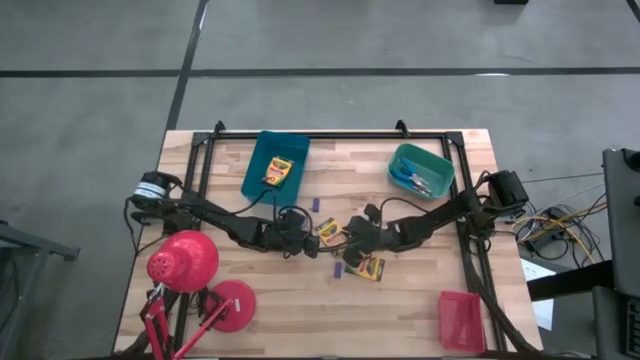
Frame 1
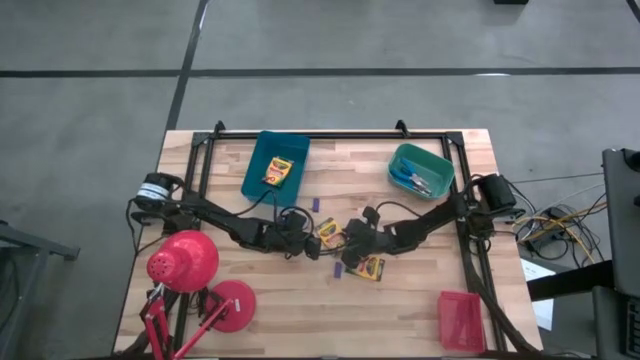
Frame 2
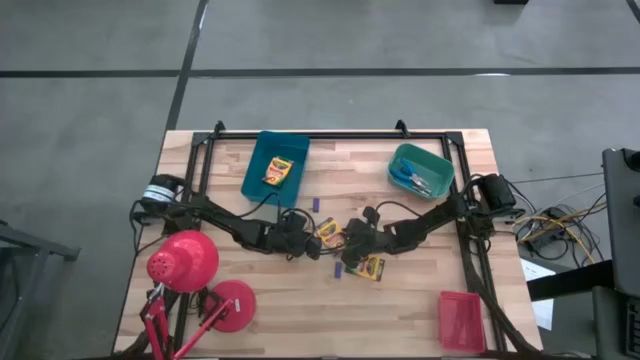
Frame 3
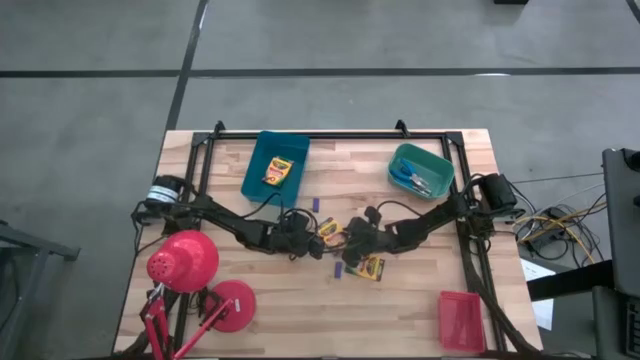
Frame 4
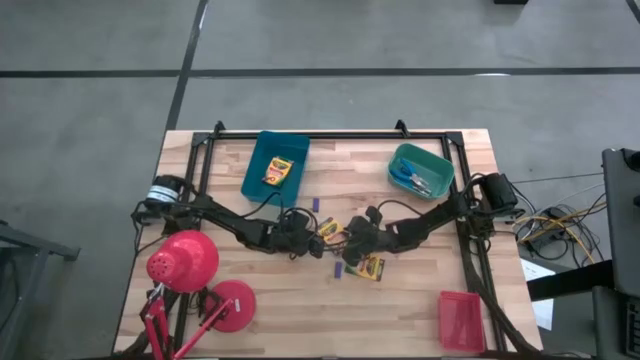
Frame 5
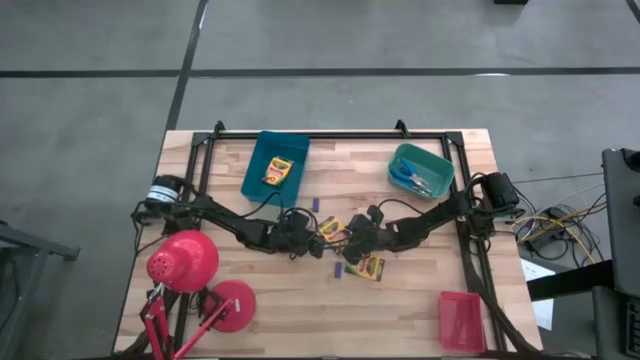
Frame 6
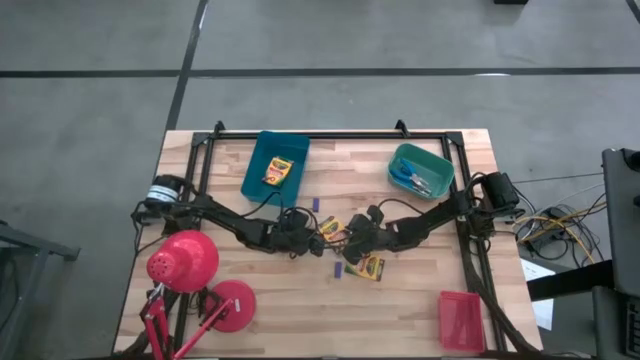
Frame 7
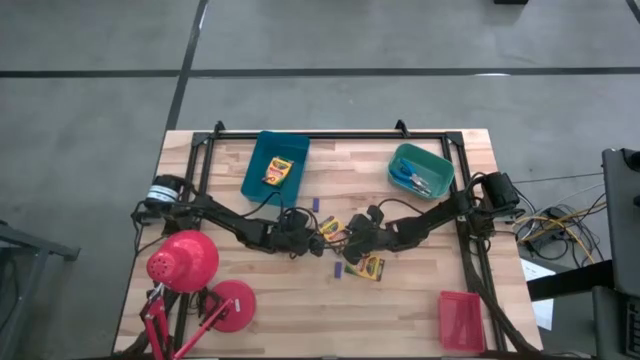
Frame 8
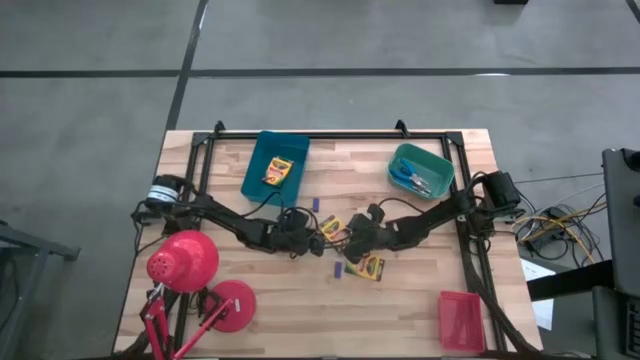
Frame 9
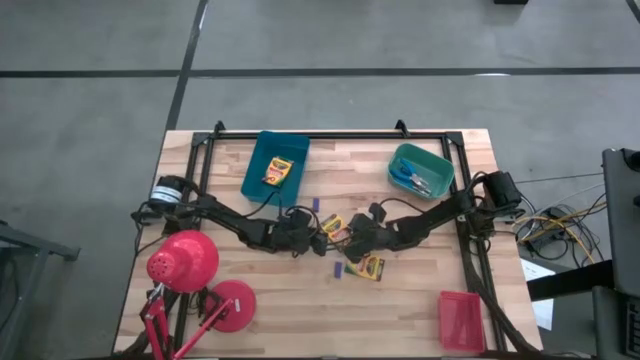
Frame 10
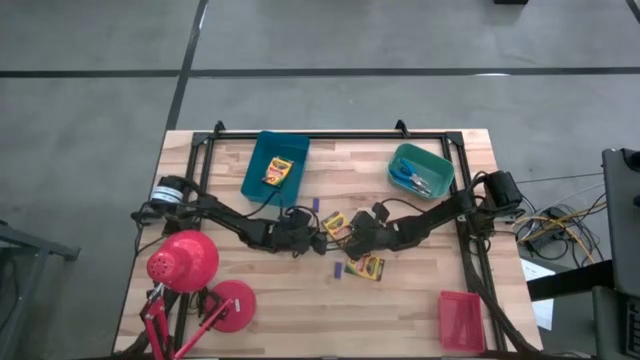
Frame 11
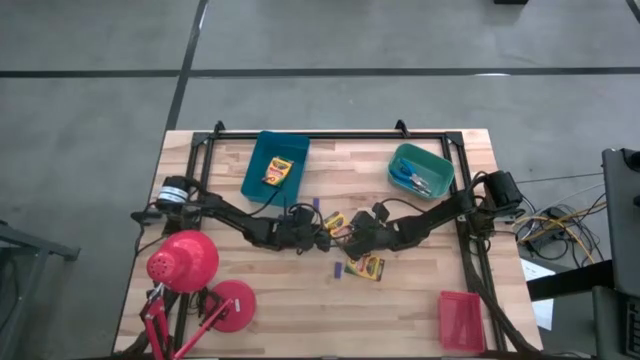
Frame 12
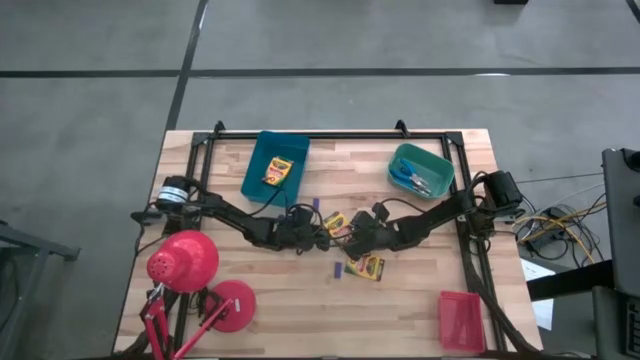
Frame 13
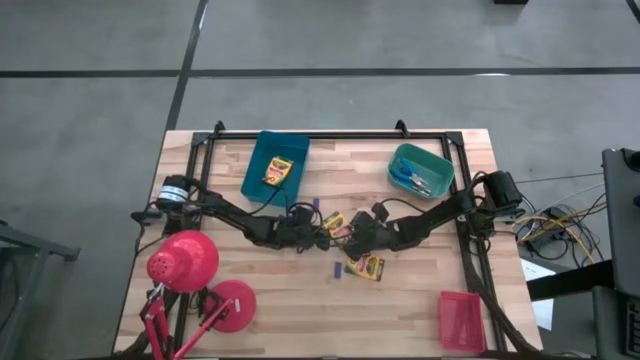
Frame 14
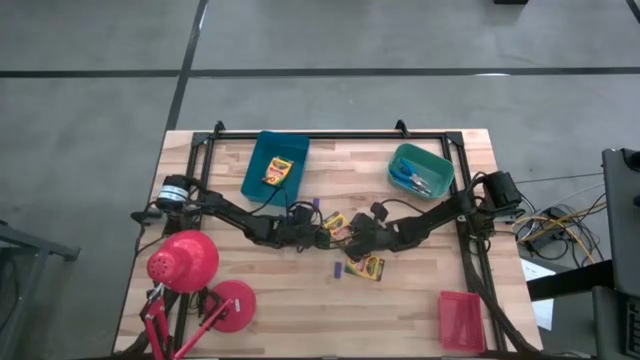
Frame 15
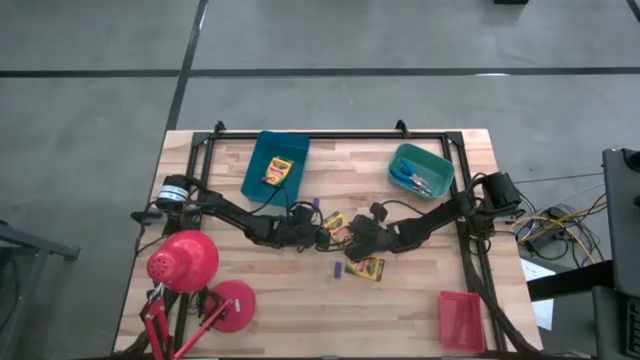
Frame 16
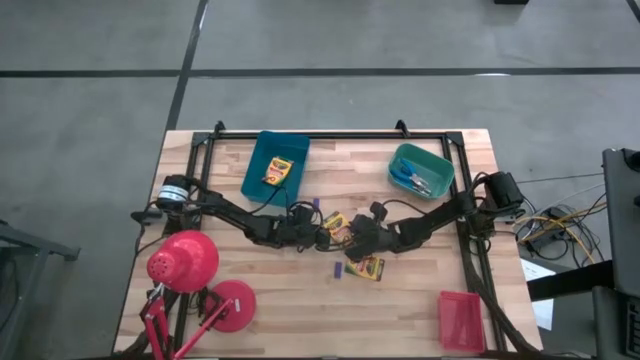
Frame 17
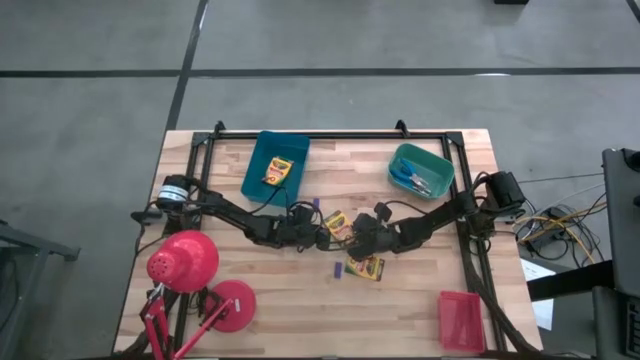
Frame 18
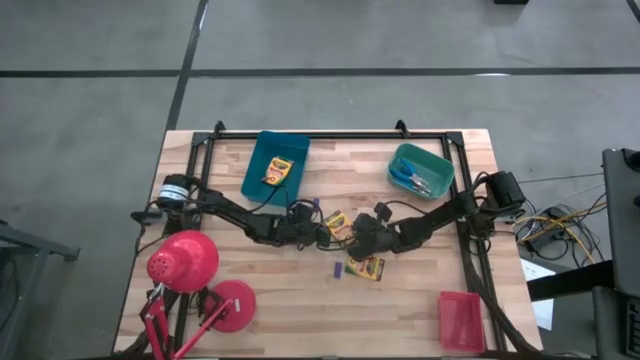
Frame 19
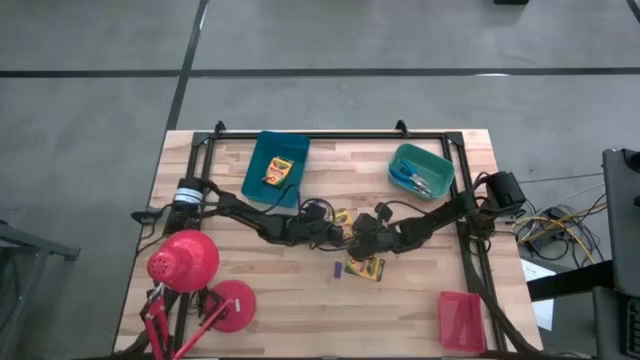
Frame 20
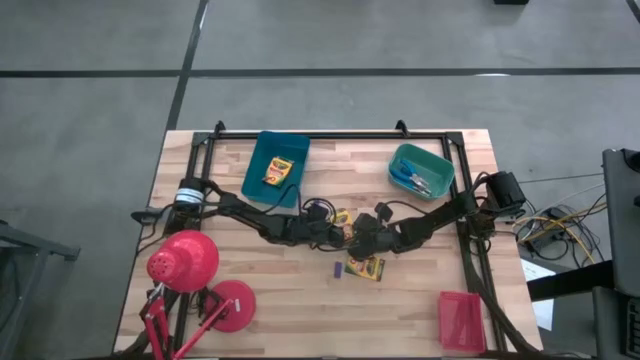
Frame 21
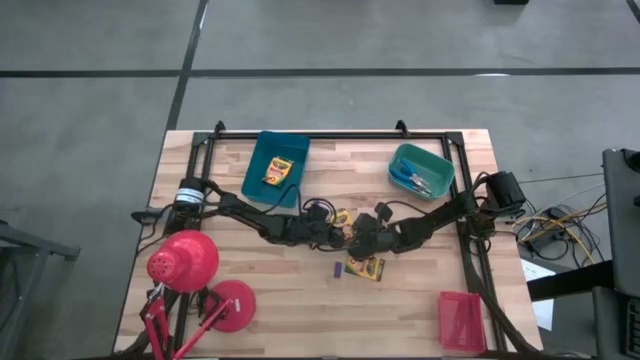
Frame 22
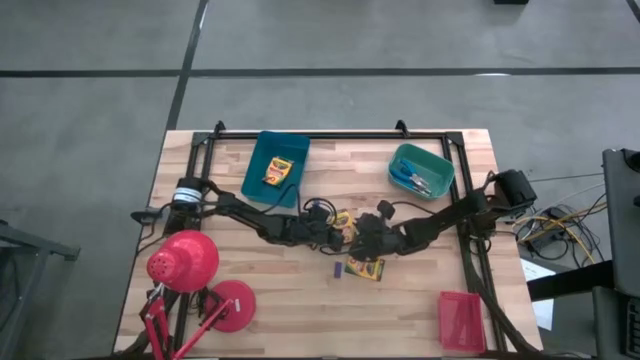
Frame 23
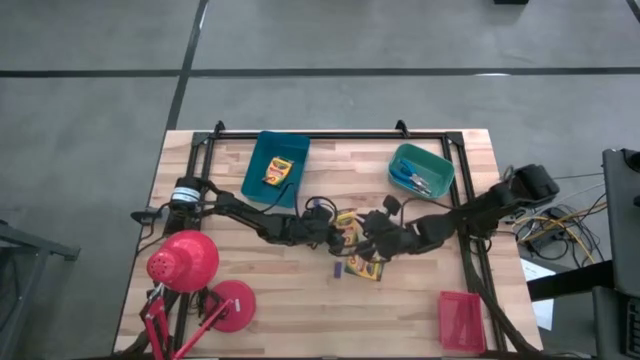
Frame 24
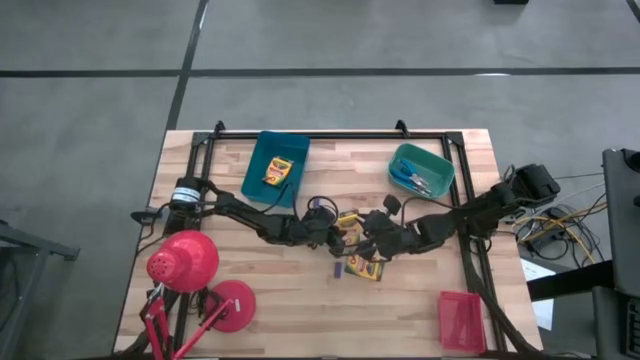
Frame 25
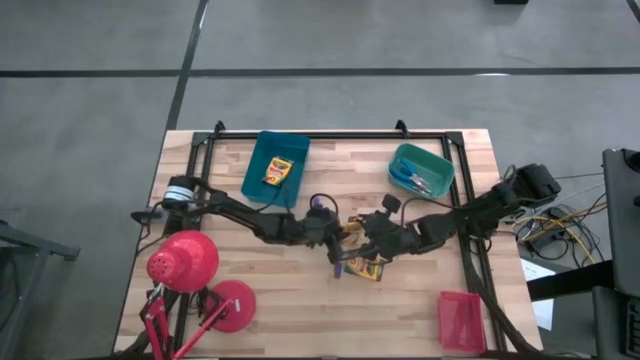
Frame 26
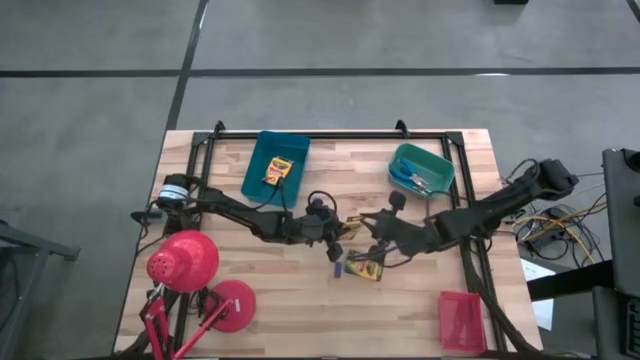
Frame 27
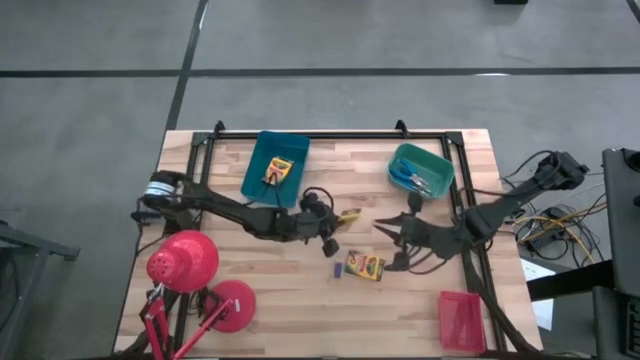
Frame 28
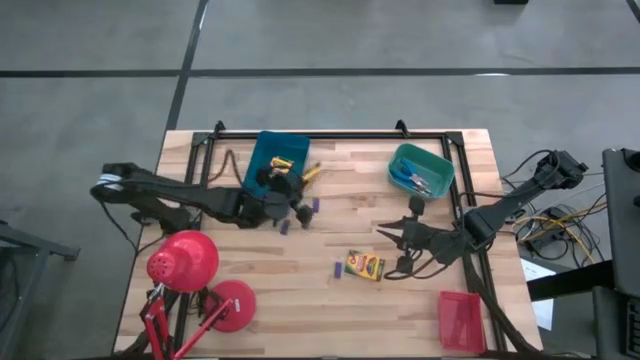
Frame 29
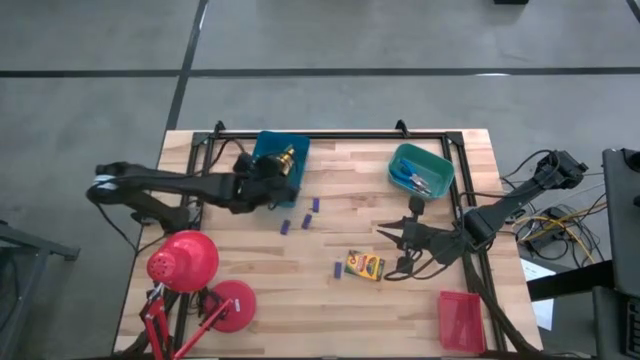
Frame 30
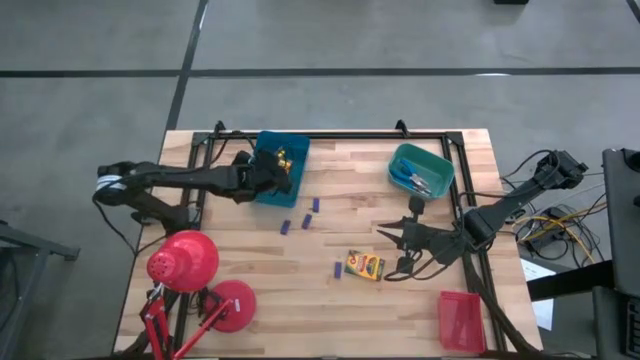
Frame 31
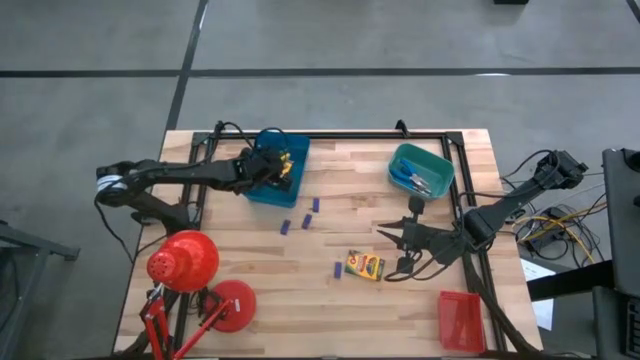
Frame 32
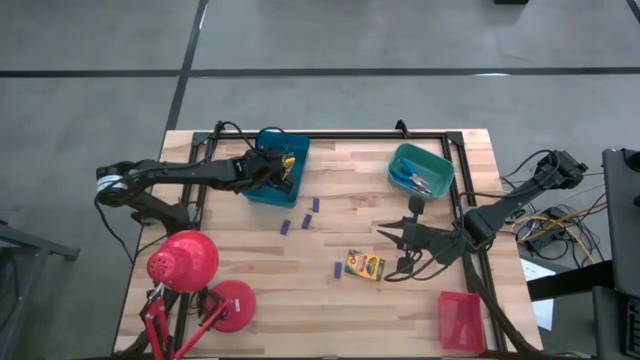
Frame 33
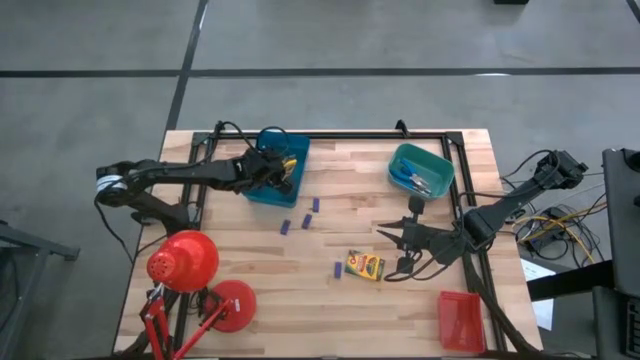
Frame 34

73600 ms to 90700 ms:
Task: Pick & Place School Supplies
Put the yellow crayon box into the blue bin

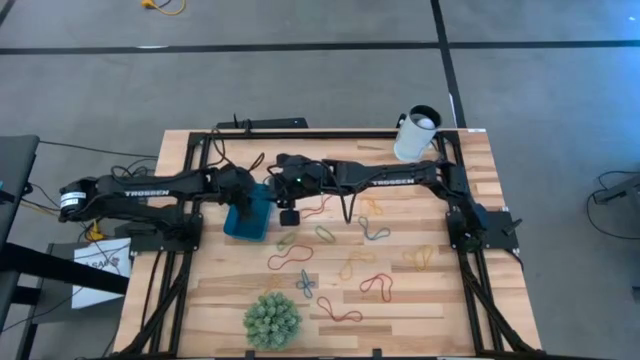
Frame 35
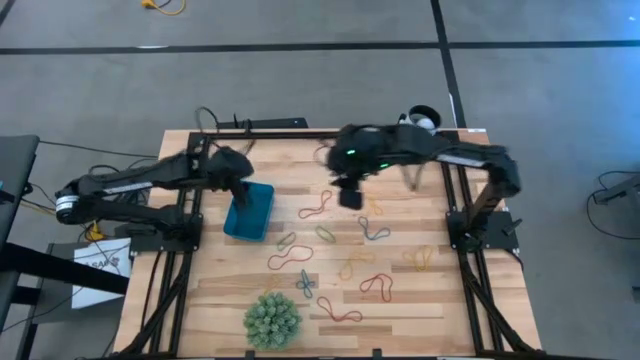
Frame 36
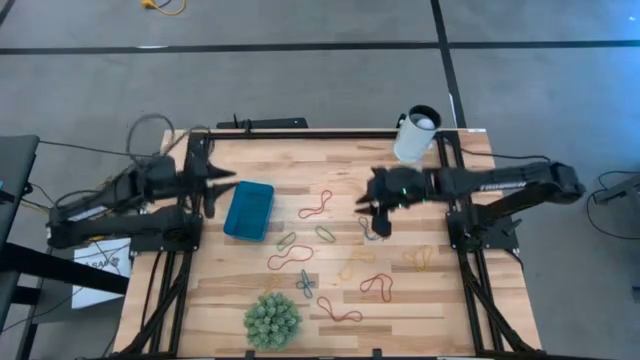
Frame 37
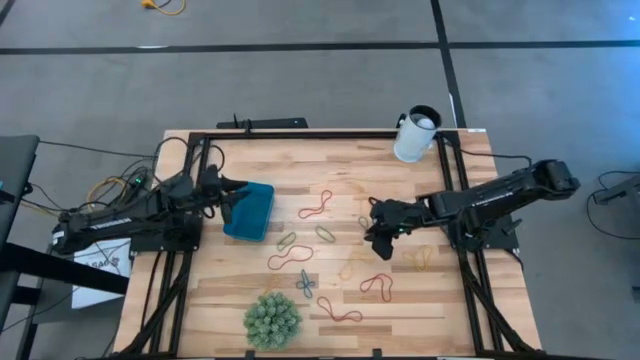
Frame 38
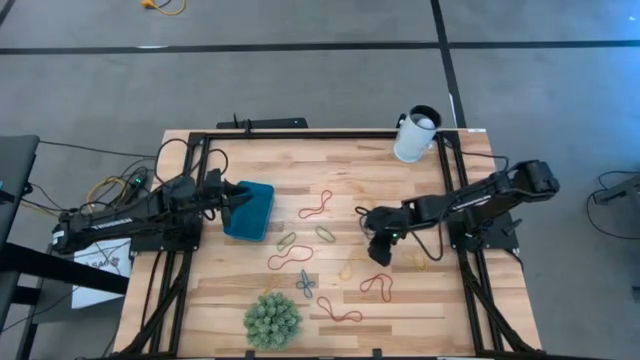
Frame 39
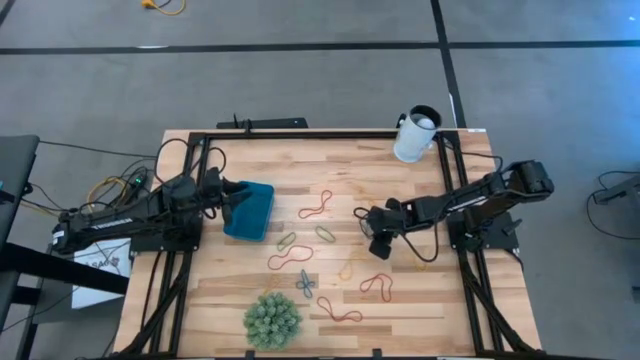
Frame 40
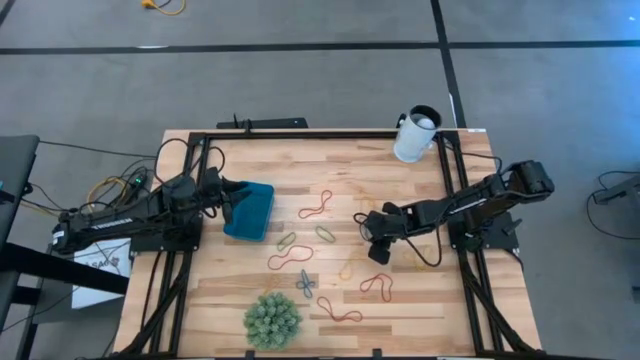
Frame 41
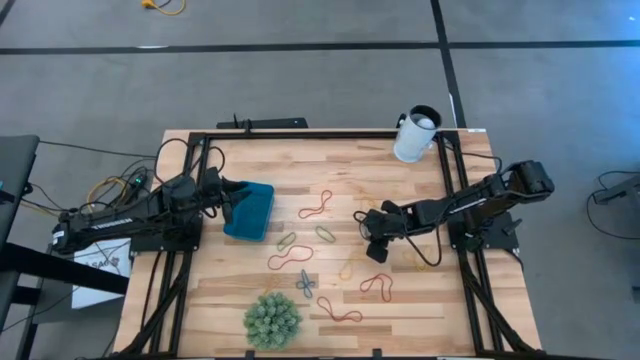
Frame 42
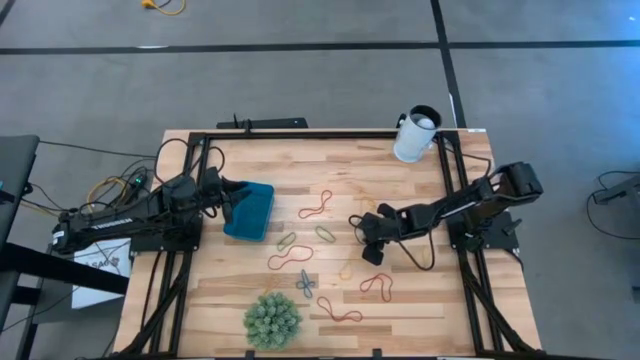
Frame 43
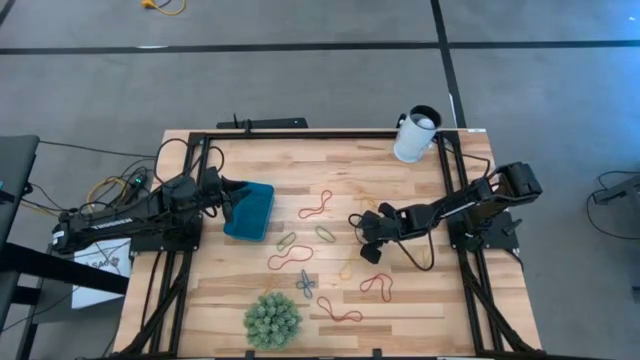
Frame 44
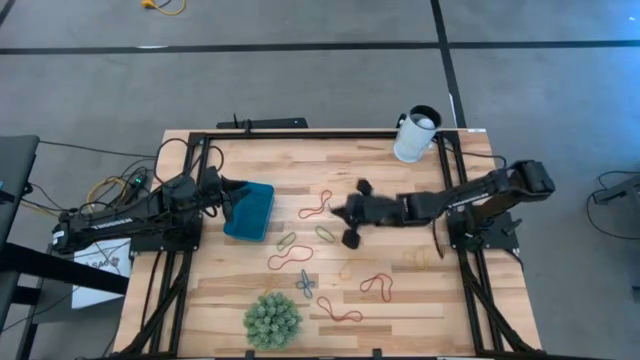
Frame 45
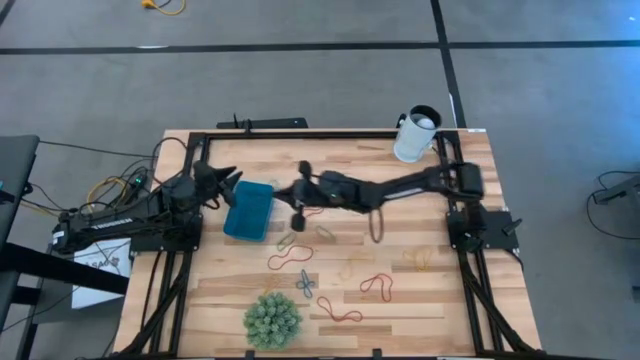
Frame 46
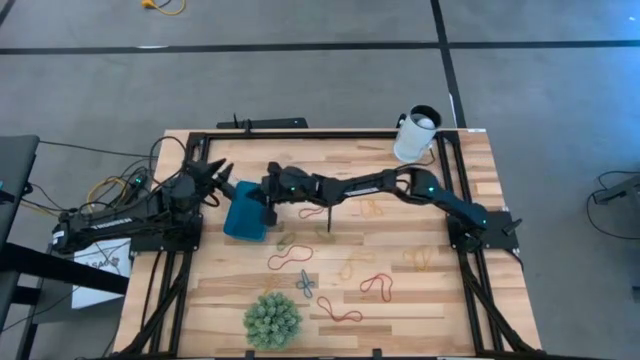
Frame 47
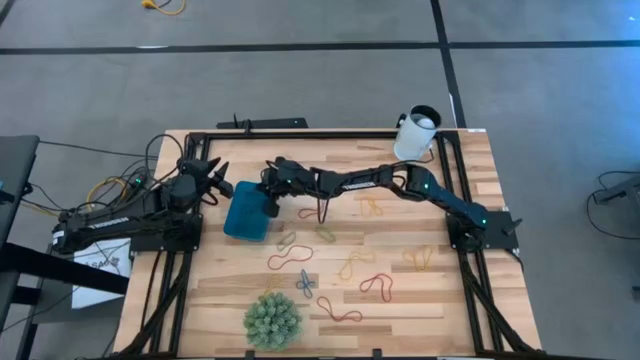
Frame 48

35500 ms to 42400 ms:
Task: Pick and place items into bin
Put the blue rubber band into the blue bin
